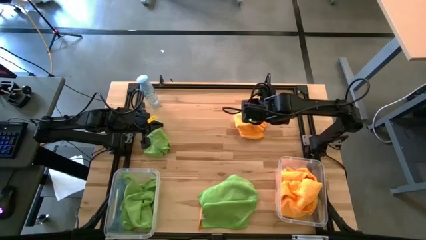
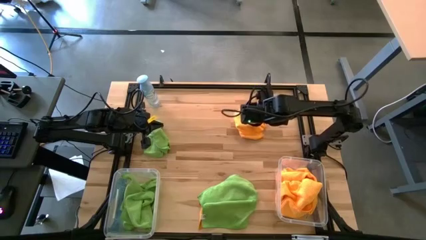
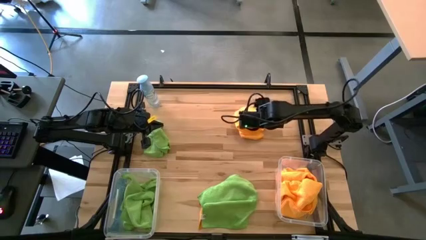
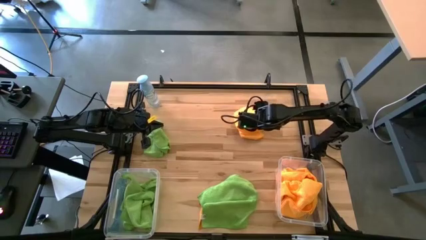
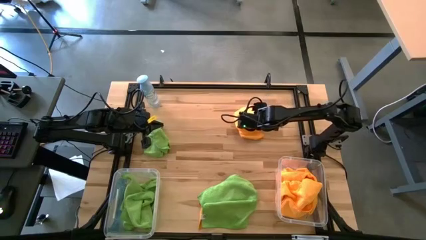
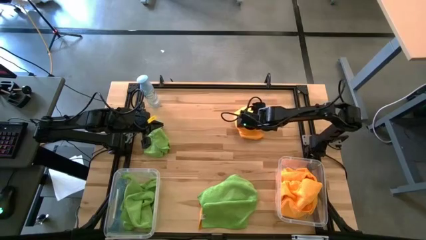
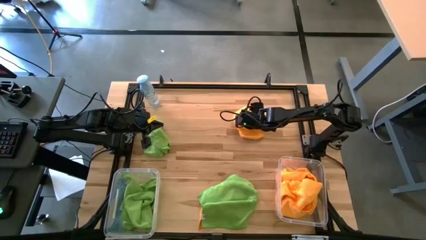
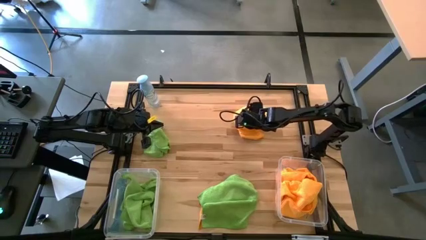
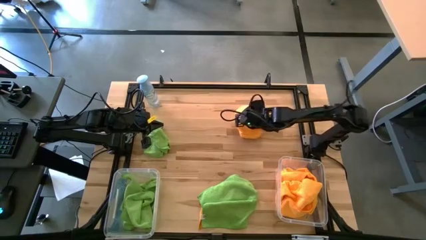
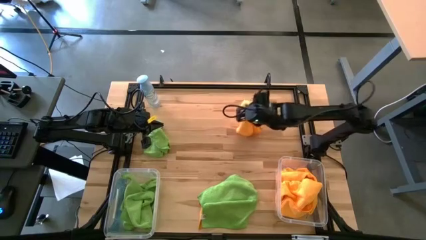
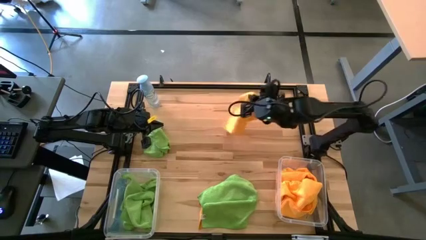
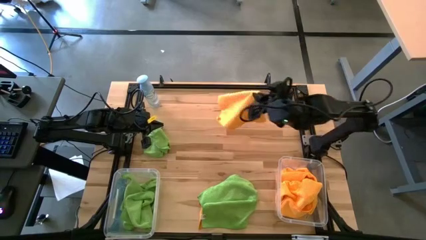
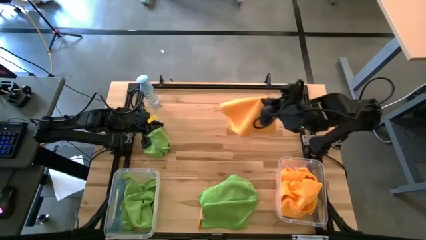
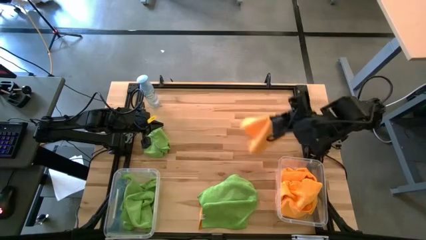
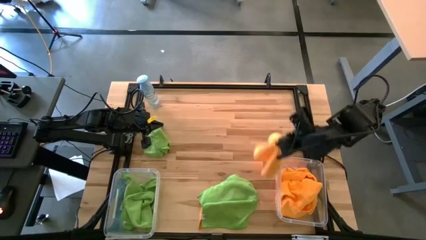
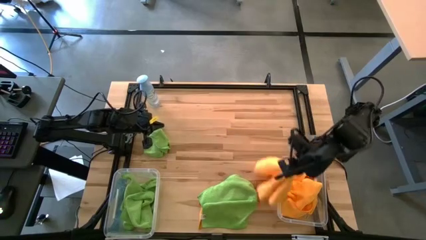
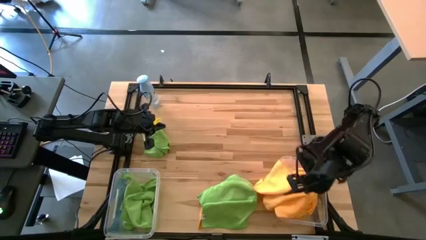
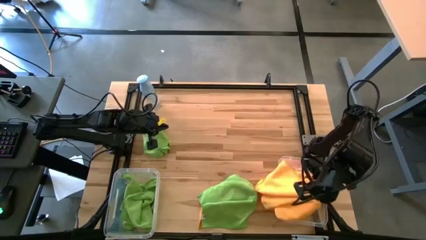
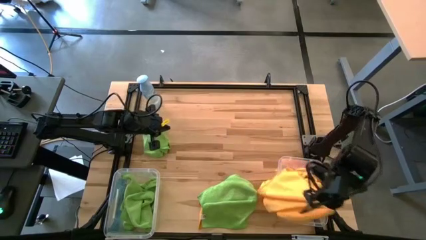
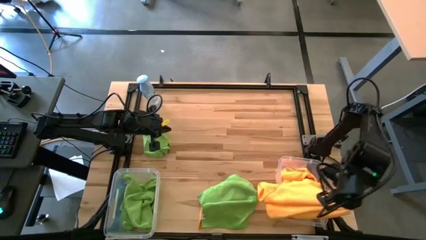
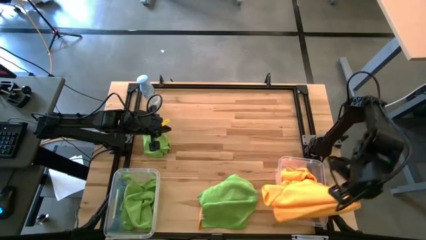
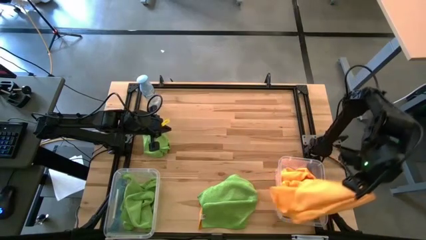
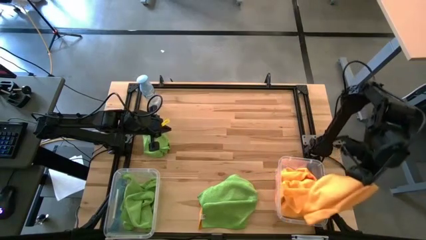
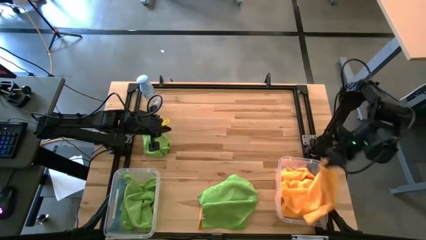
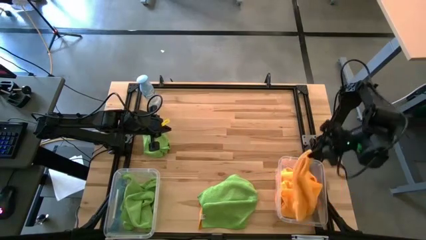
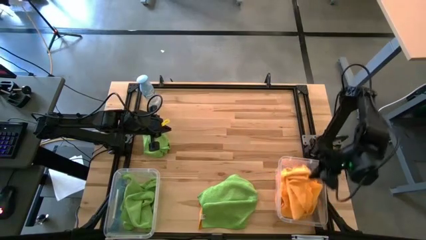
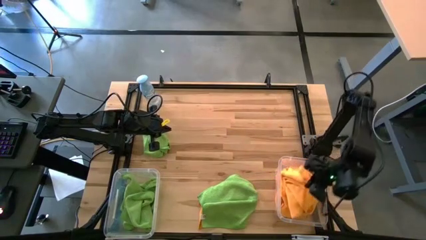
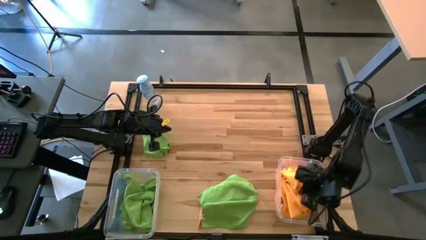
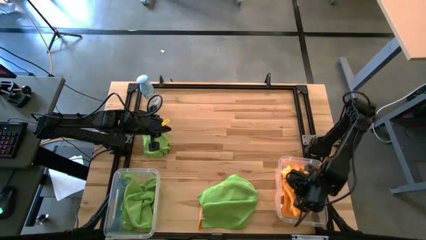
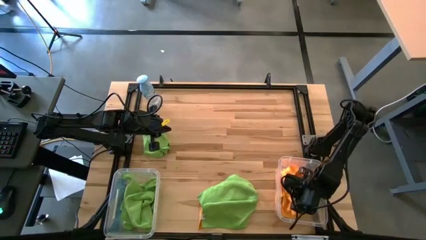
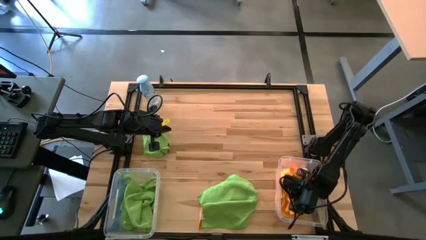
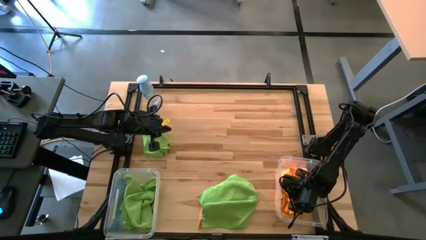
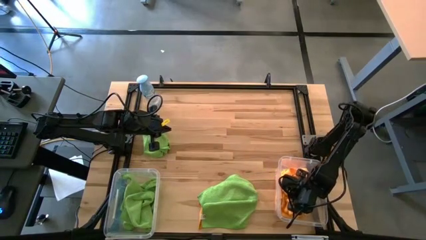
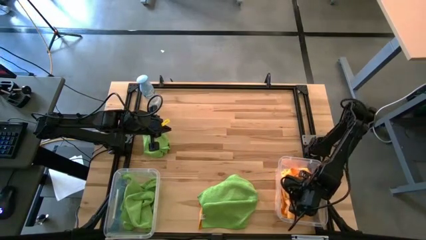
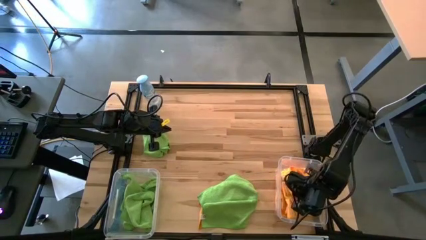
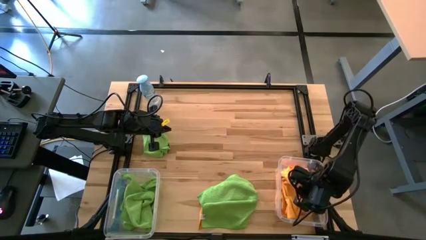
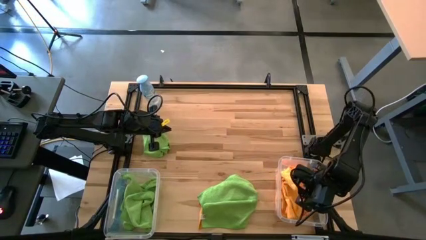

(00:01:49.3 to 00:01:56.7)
Task: Sort microfiber towel by color & place in baskets
Put the yellow towel into the right transparent bin

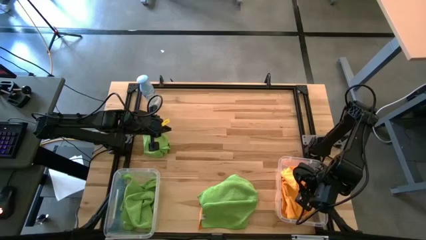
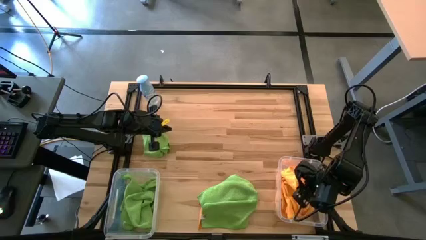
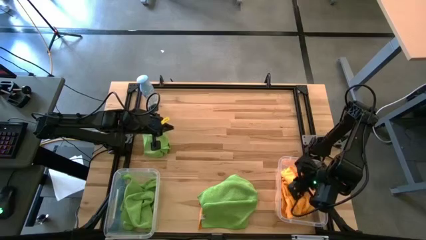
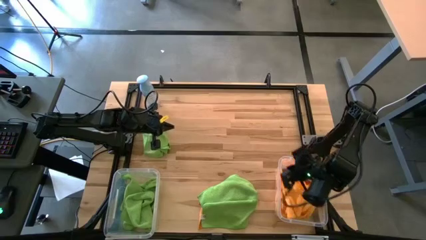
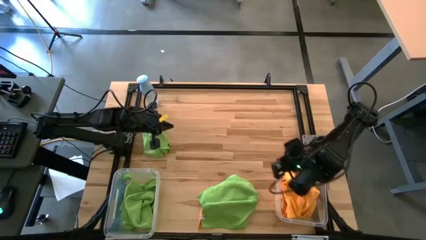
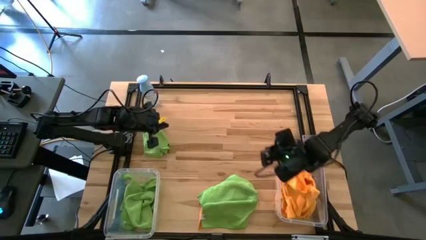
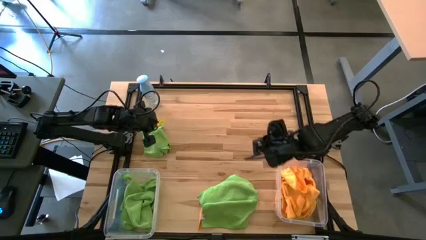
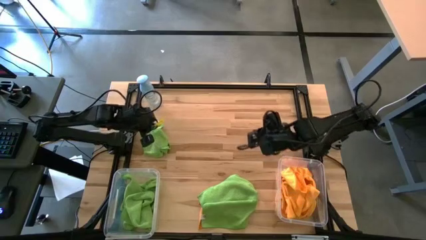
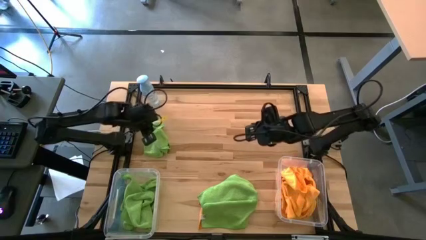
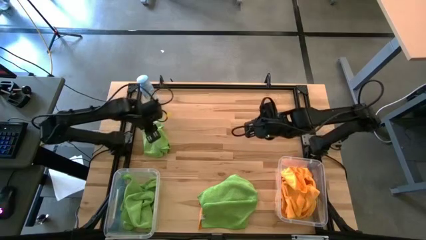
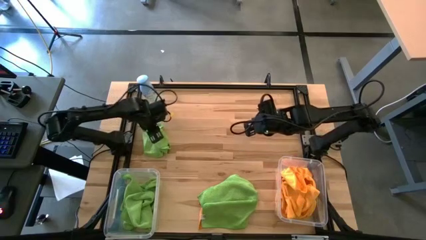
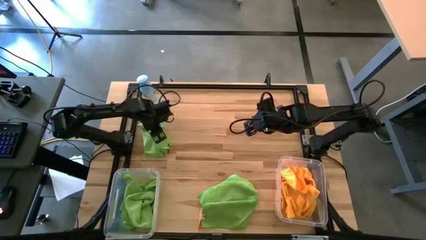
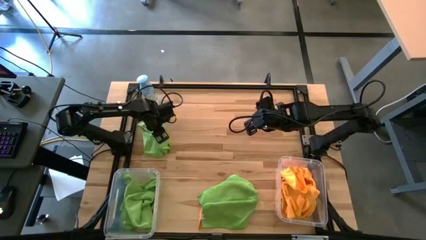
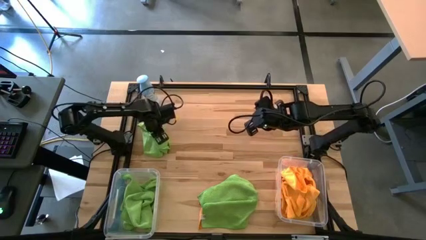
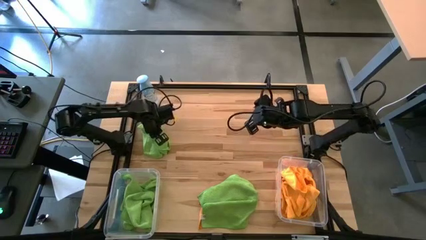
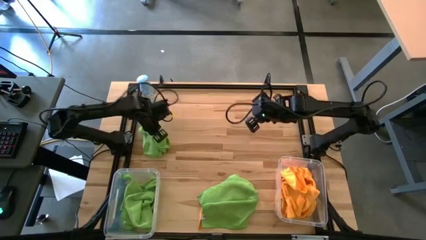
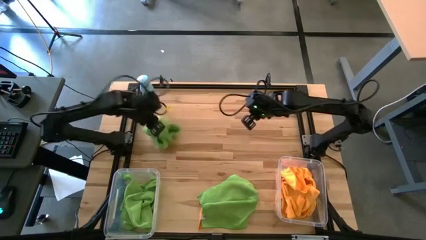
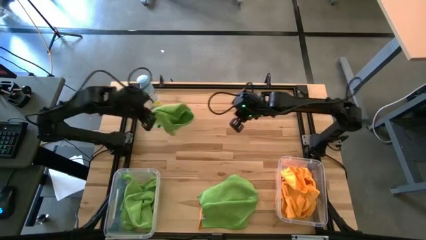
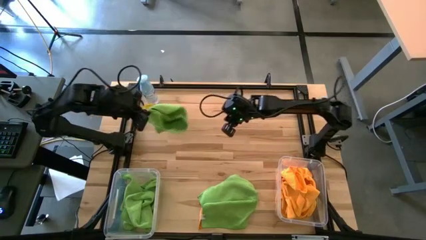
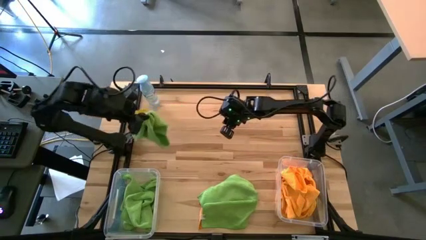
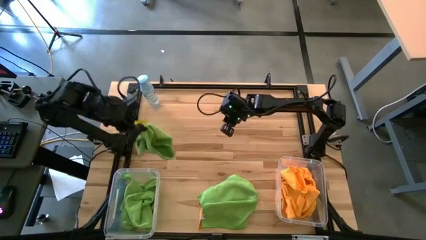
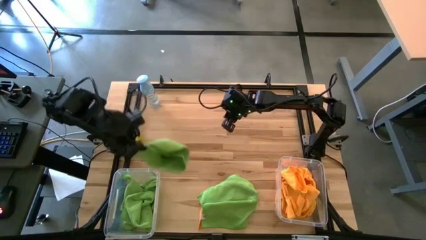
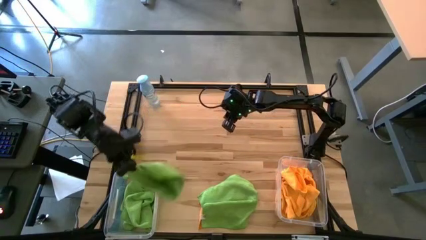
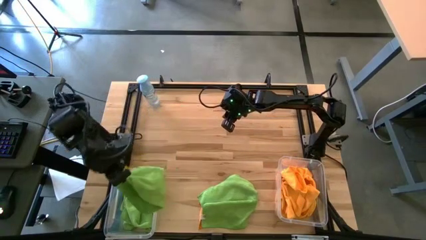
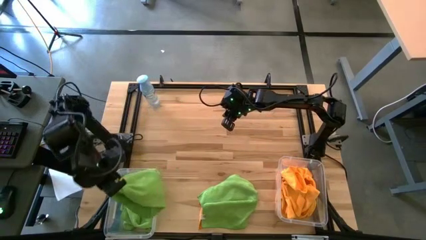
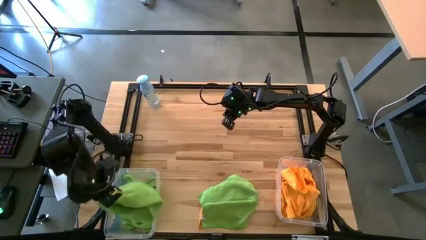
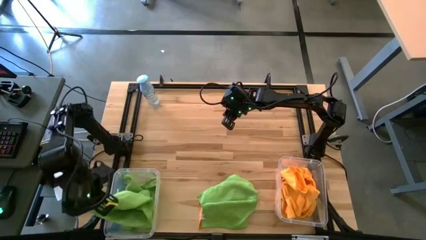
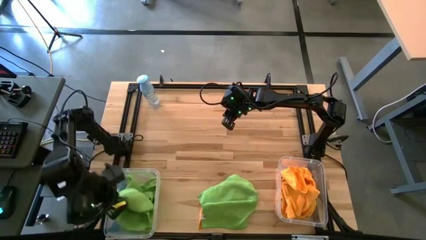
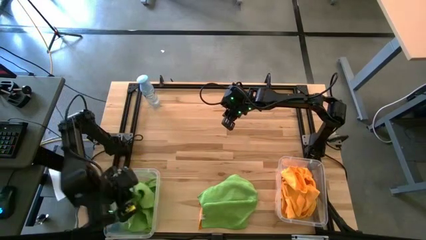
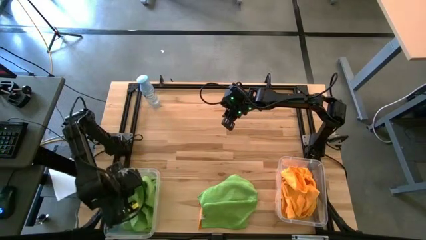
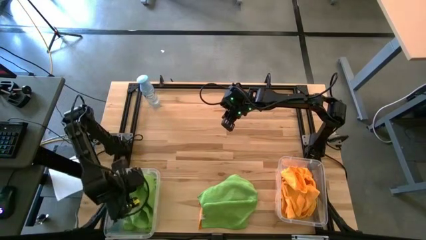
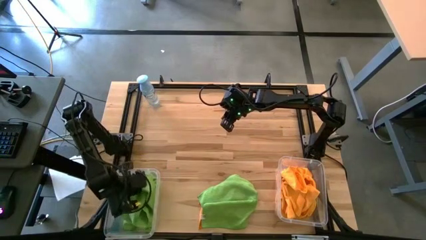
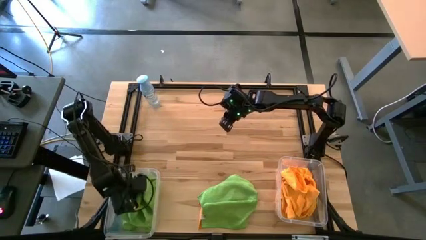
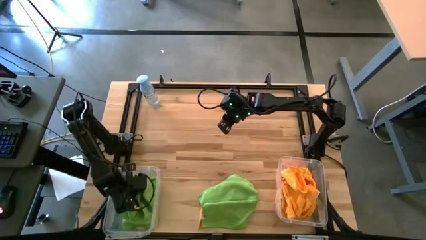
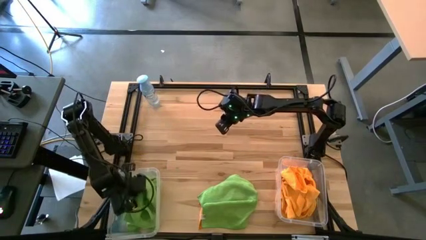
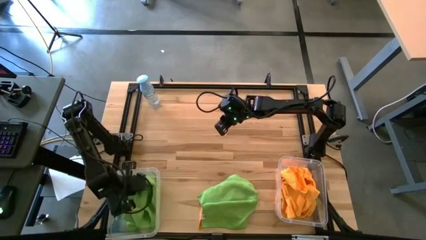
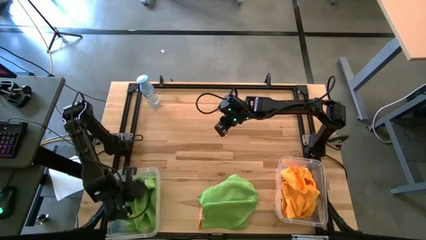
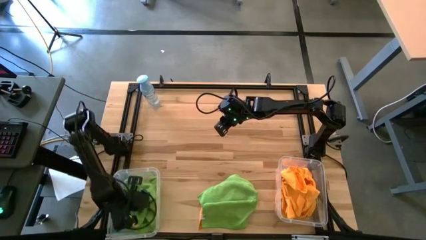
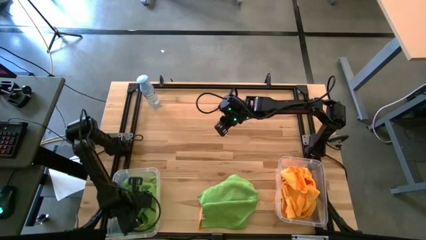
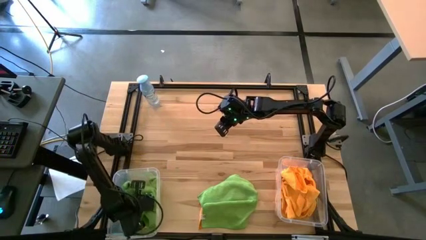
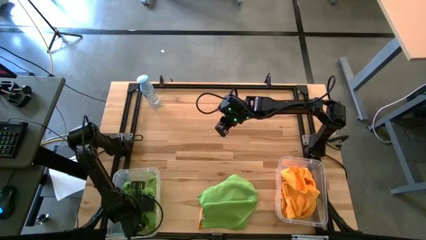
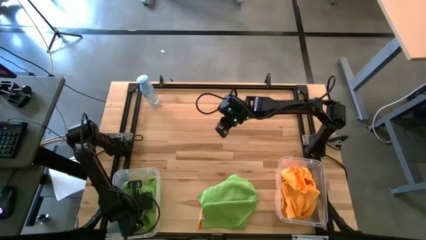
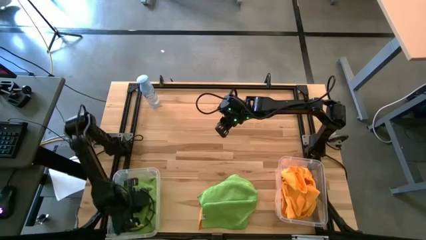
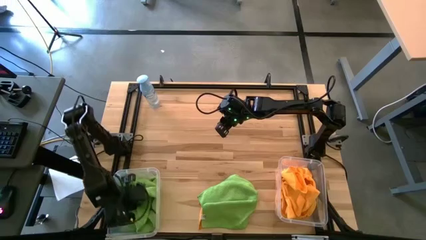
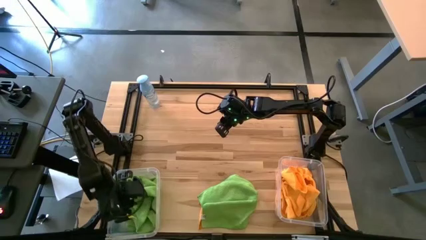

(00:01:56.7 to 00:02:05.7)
Put the green towel into the left transparent bin
